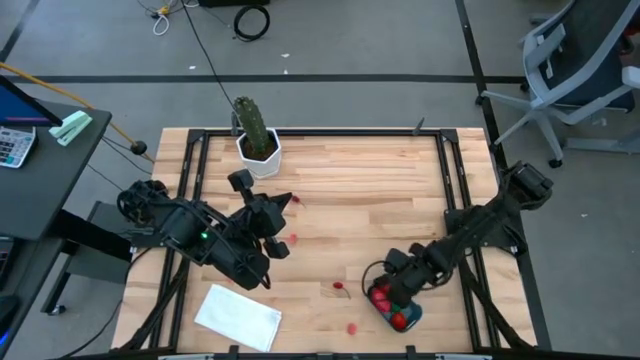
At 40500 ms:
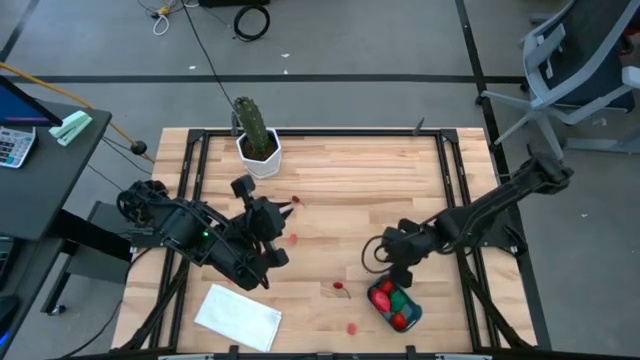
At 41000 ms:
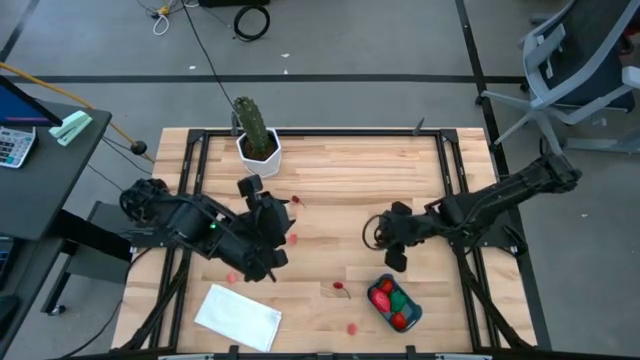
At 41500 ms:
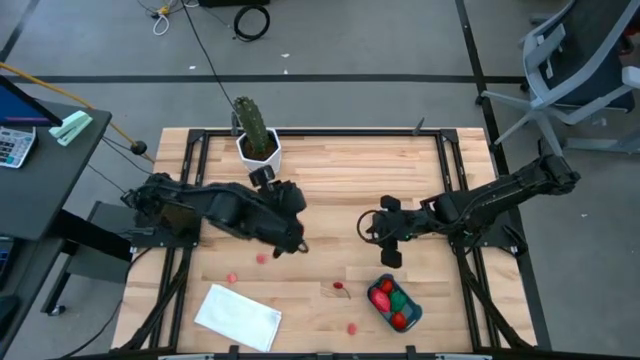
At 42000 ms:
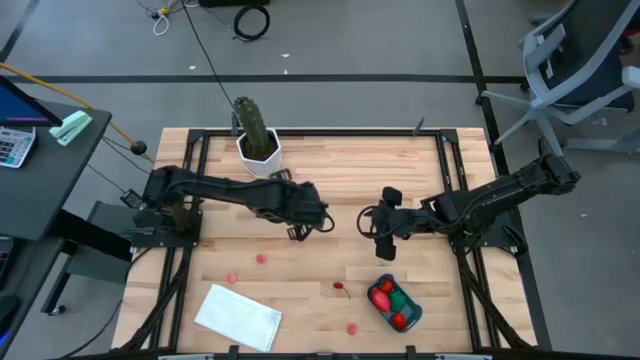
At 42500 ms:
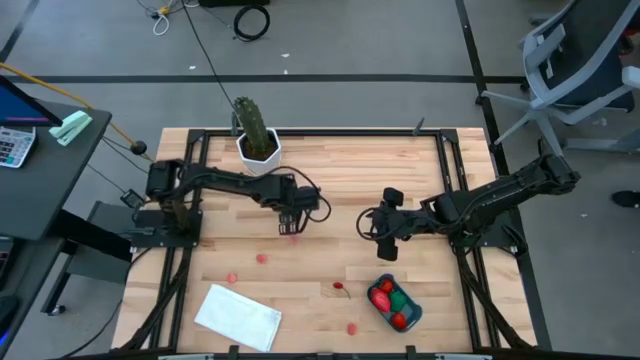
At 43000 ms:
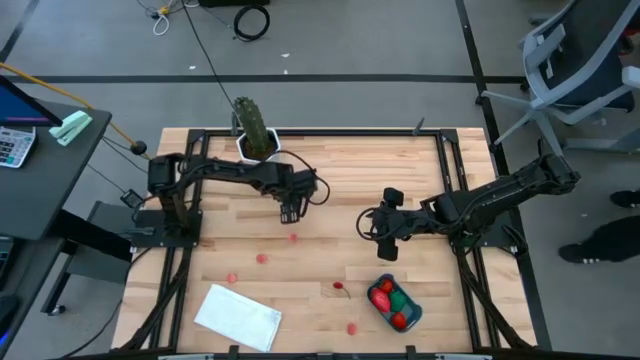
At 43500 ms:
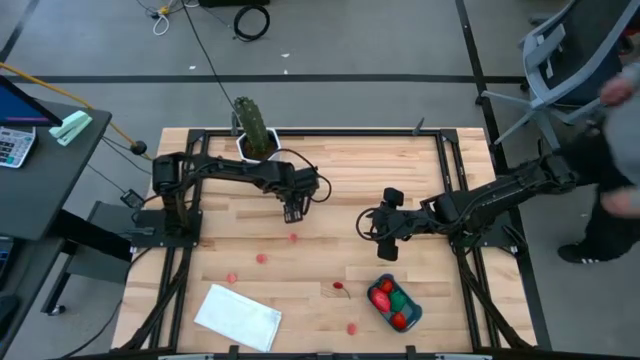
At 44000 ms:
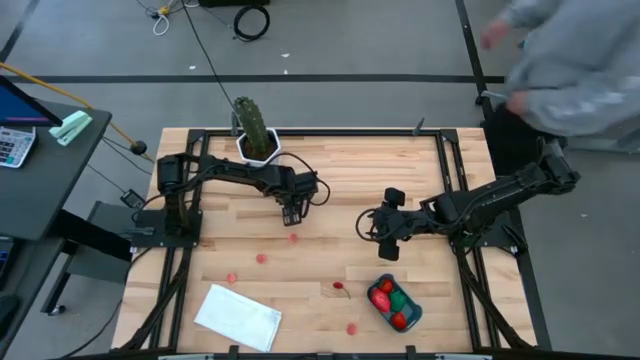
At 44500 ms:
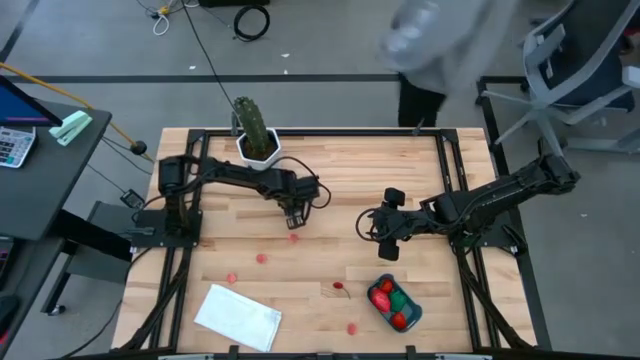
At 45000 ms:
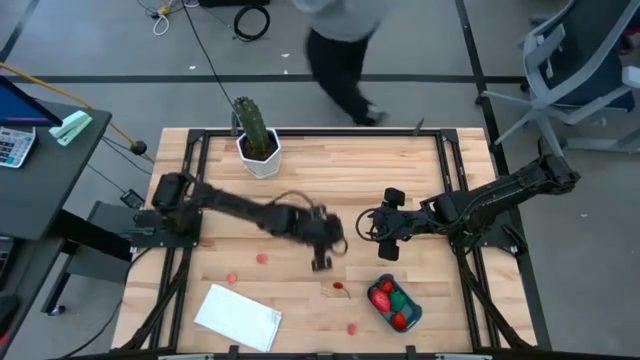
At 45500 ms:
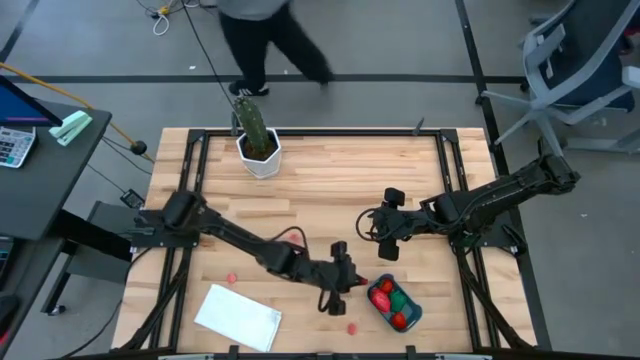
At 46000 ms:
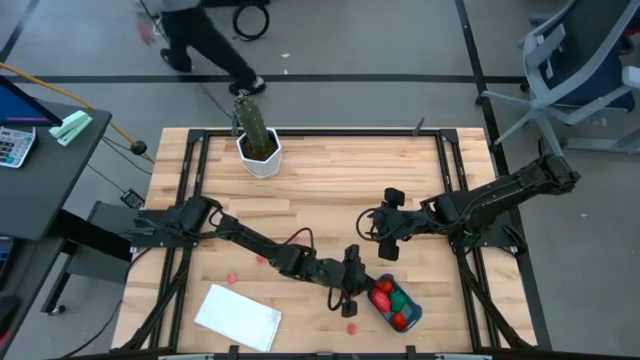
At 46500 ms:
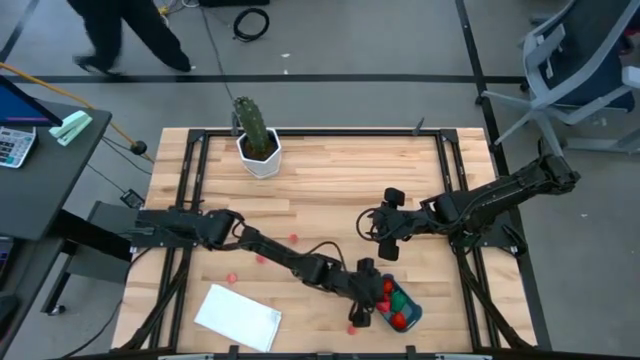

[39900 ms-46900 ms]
Task: Pick and placing Produce into tupperware
Put the chili pepper into the bin

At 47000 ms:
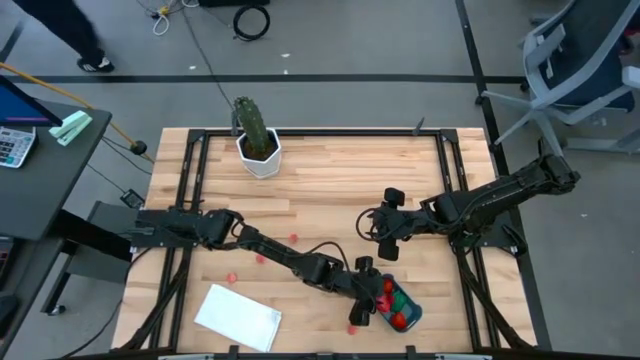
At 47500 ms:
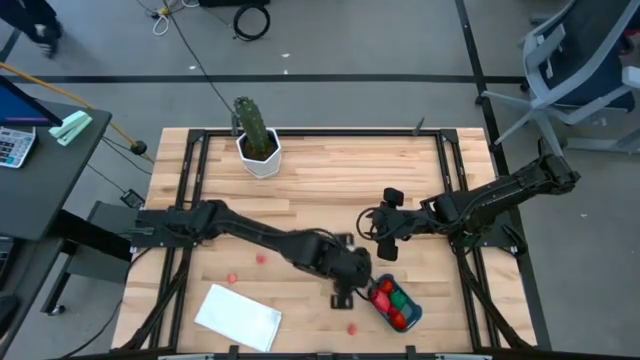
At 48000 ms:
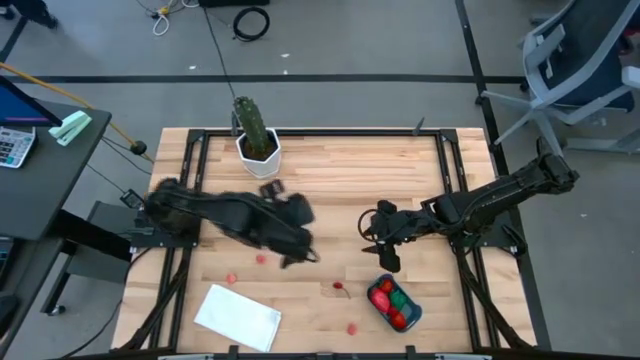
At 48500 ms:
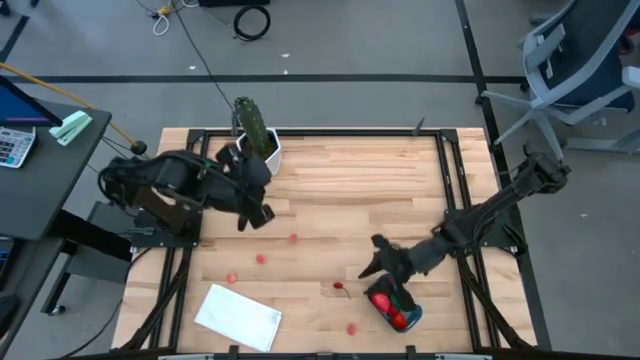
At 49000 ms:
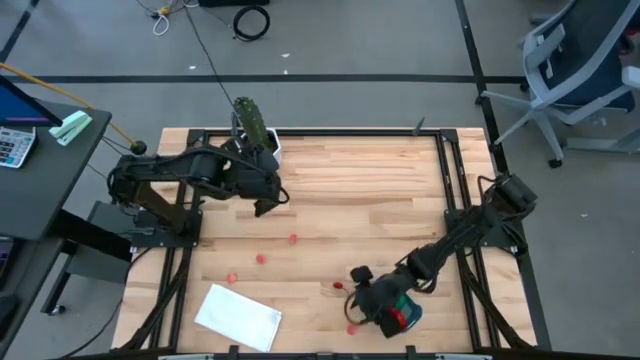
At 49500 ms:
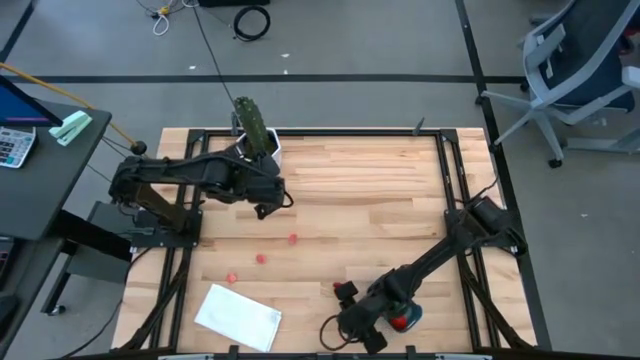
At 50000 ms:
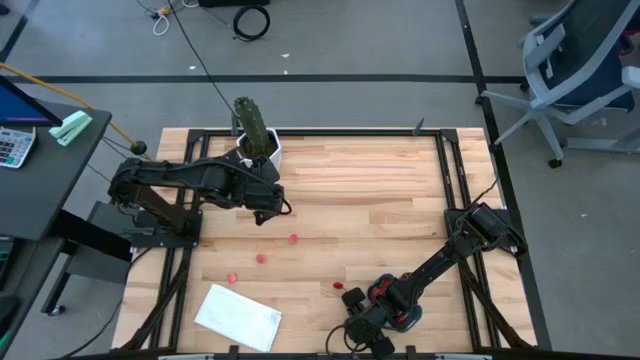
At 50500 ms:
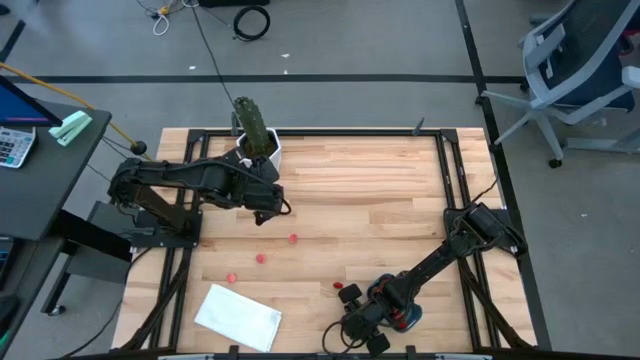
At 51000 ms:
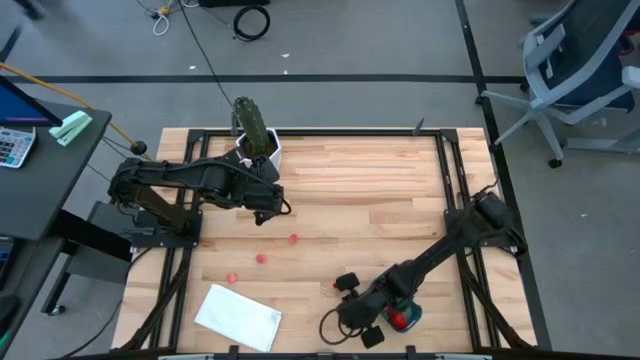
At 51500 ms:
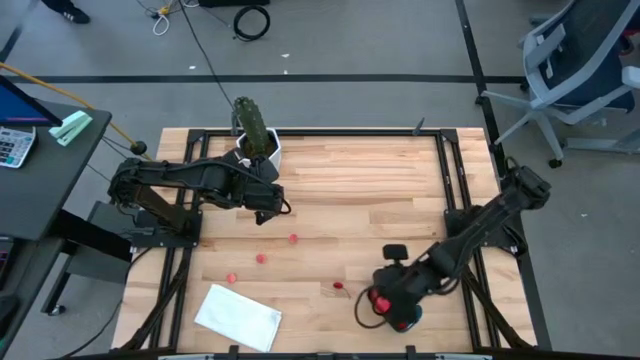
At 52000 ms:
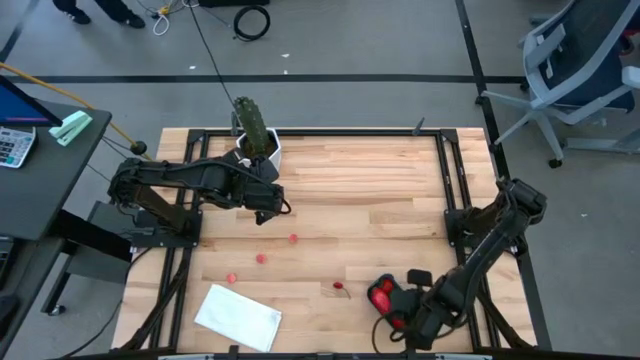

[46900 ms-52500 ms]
Put the peach into the bin

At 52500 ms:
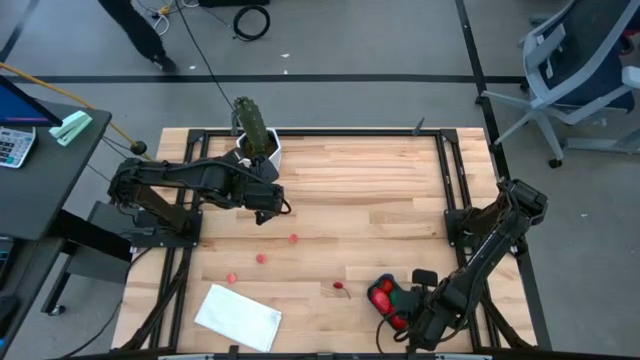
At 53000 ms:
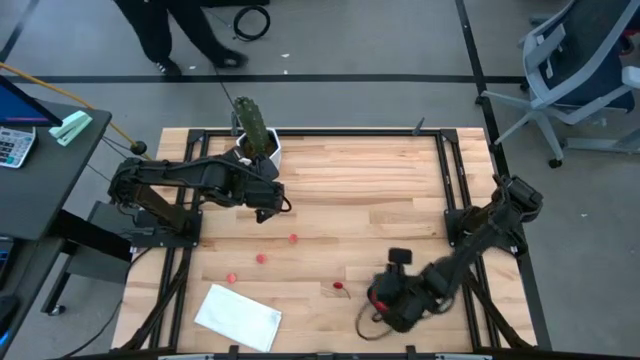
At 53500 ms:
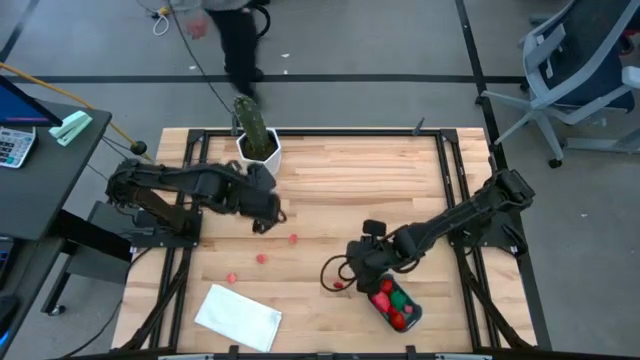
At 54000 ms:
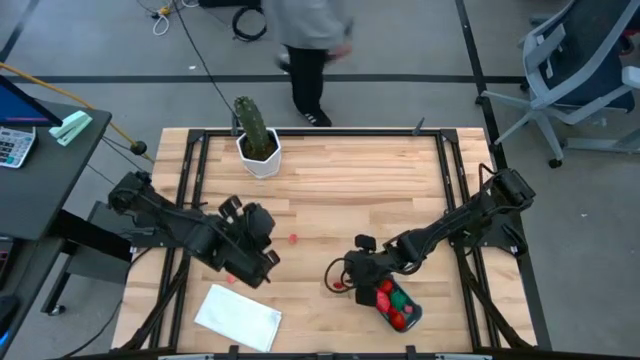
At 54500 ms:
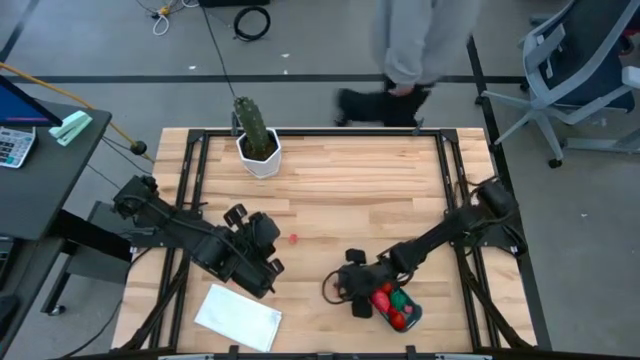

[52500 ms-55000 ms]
Put the chili pepper into the bin

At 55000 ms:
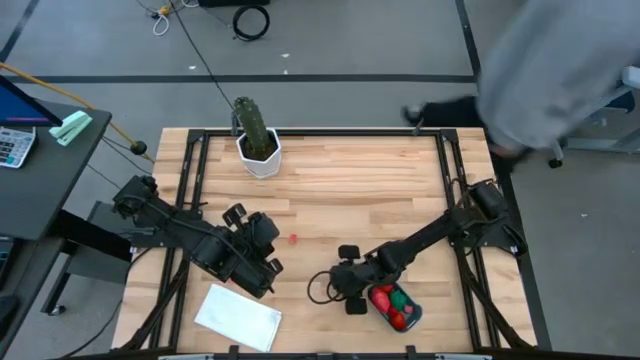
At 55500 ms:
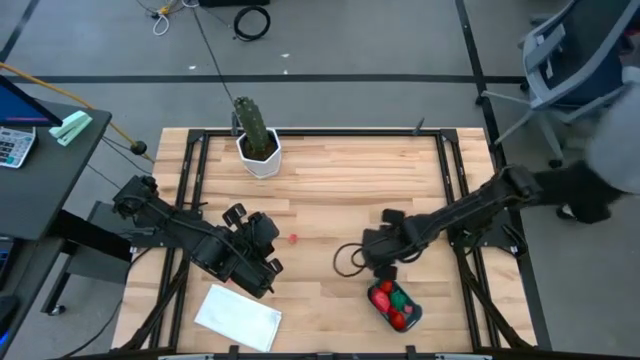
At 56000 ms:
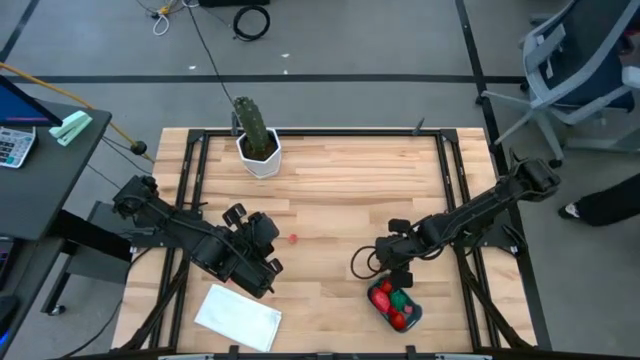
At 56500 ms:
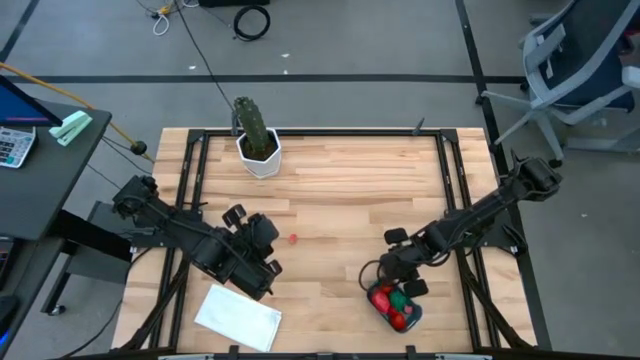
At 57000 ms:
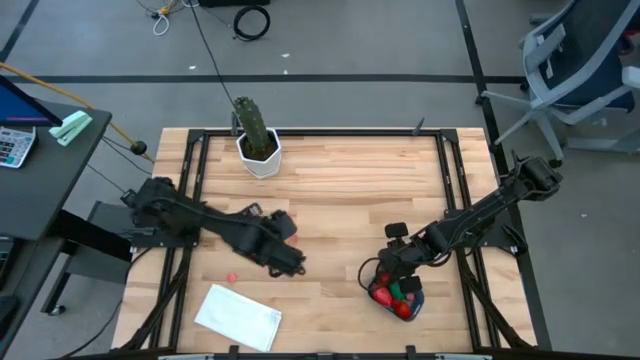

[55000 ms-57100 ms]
Adjust the bin to the right

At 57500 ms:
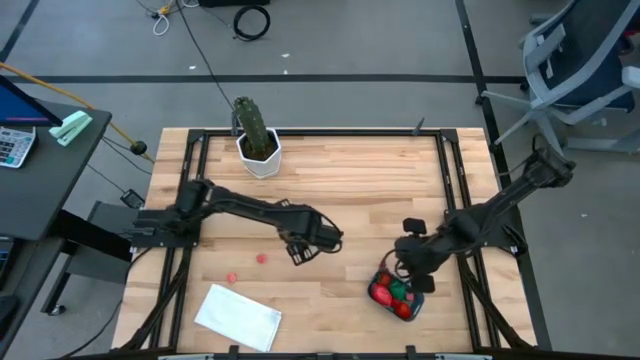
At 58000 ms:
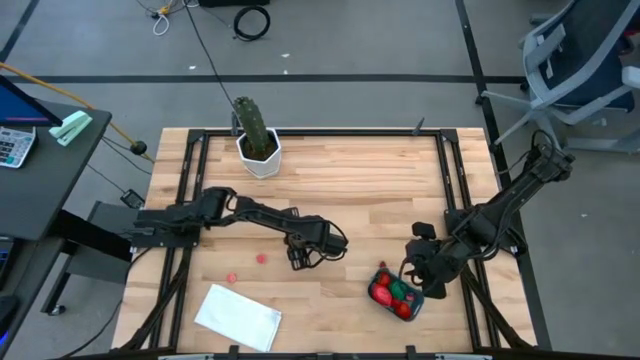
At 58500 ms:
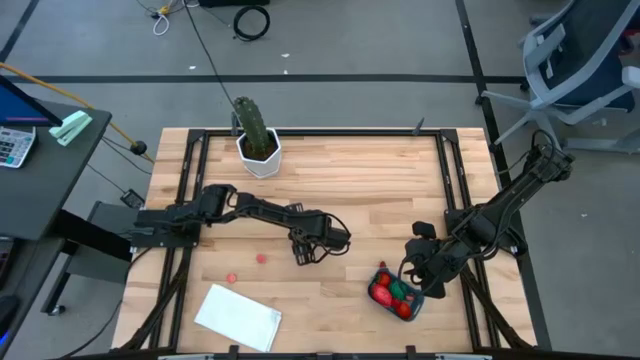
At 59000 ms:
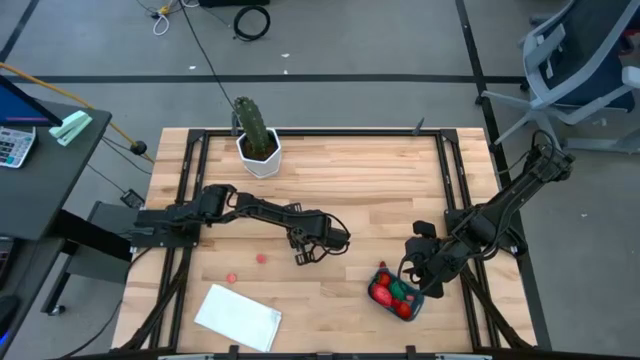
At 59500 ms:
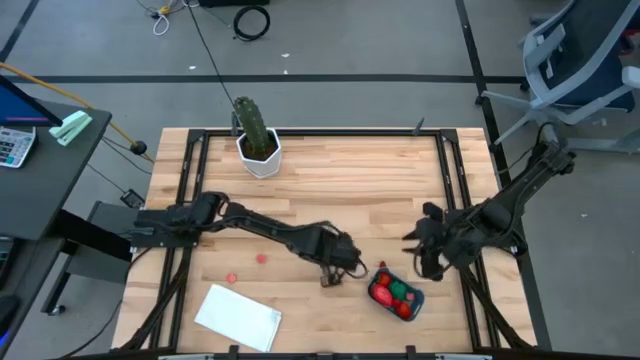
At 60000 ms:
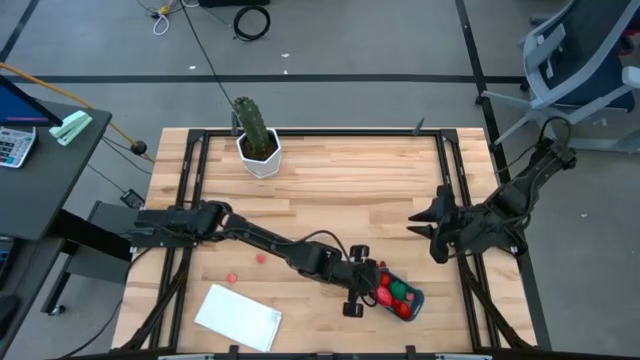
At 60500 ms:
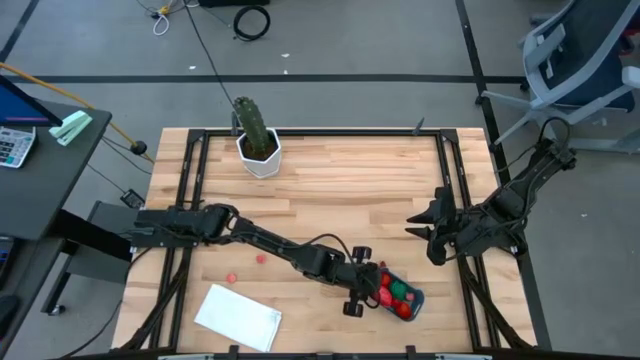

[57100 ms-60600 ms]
Put the peach into the bin
